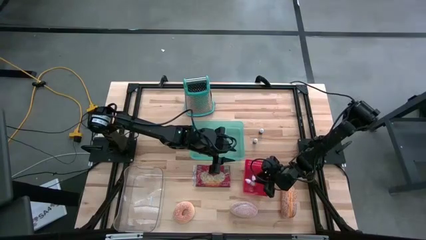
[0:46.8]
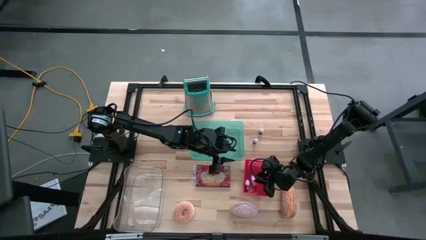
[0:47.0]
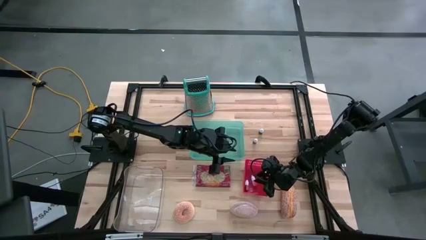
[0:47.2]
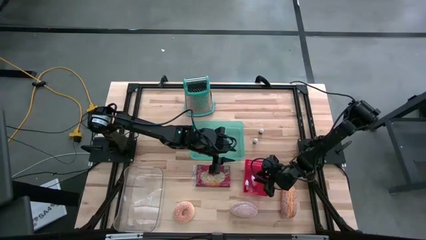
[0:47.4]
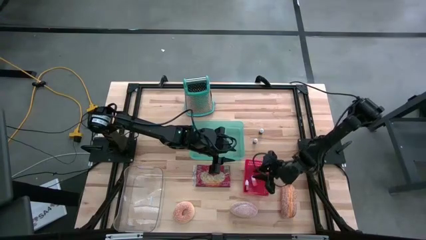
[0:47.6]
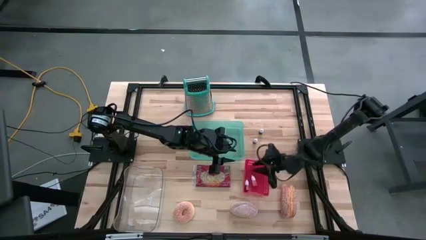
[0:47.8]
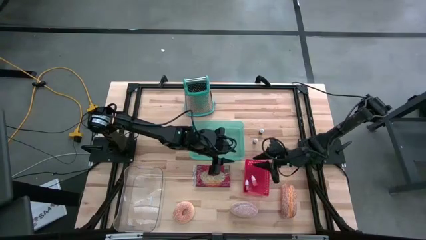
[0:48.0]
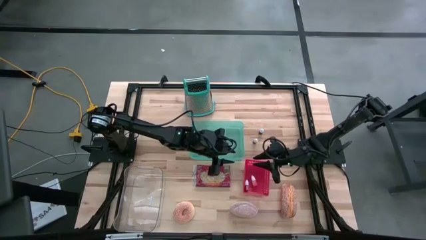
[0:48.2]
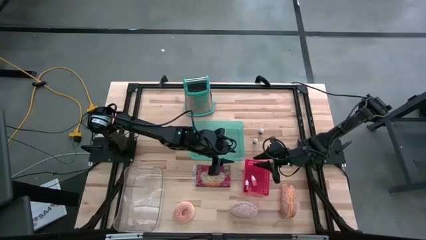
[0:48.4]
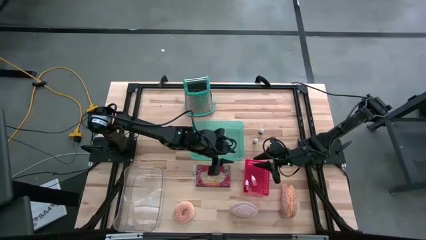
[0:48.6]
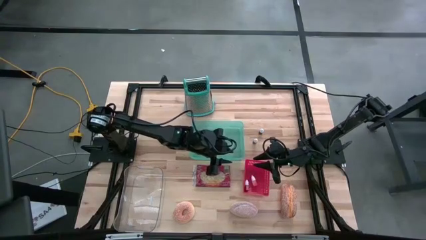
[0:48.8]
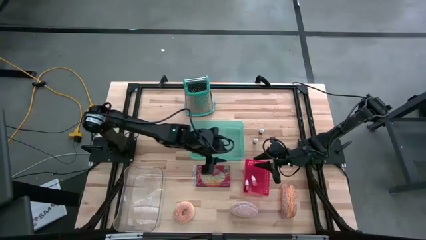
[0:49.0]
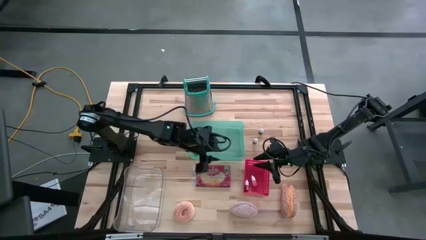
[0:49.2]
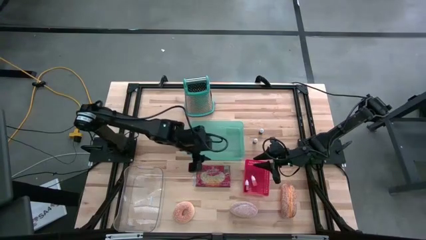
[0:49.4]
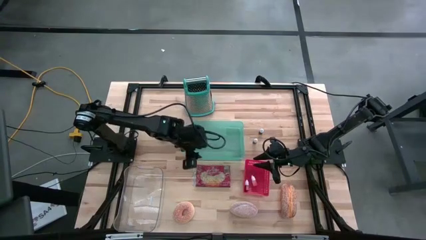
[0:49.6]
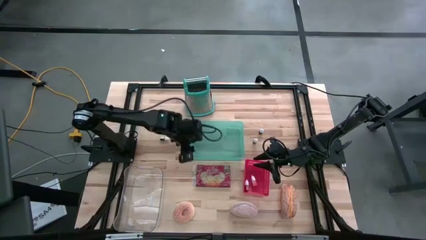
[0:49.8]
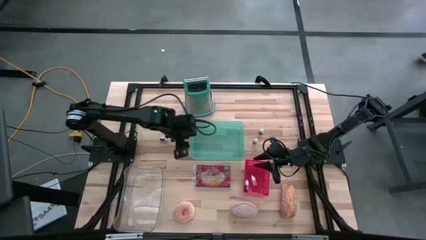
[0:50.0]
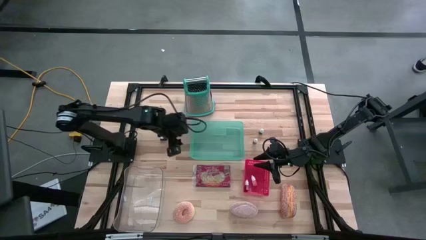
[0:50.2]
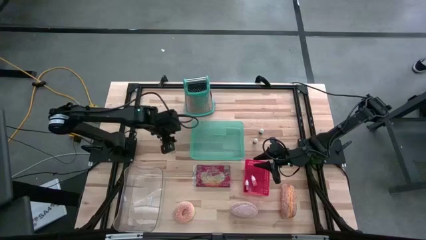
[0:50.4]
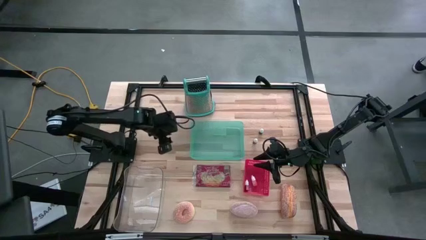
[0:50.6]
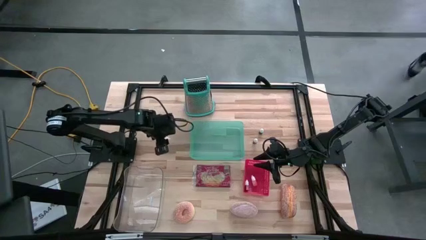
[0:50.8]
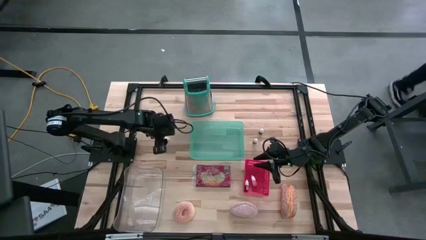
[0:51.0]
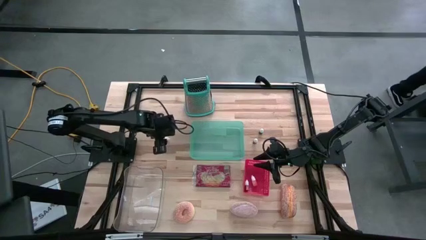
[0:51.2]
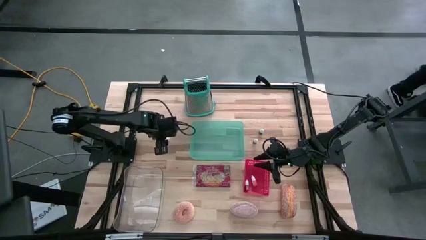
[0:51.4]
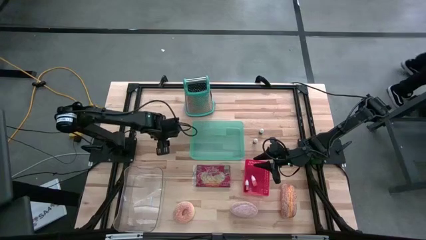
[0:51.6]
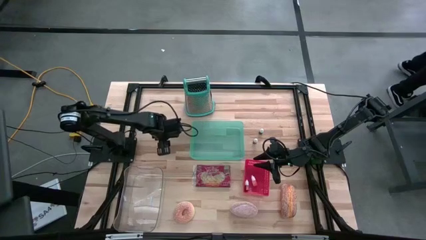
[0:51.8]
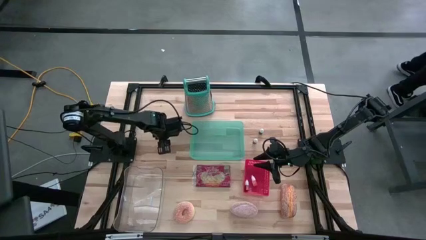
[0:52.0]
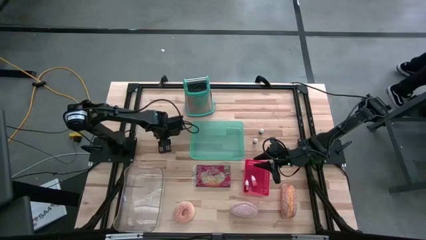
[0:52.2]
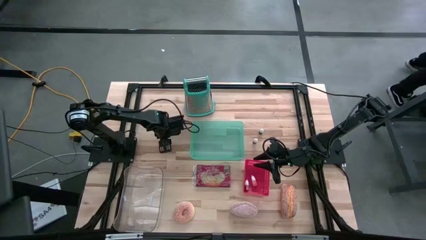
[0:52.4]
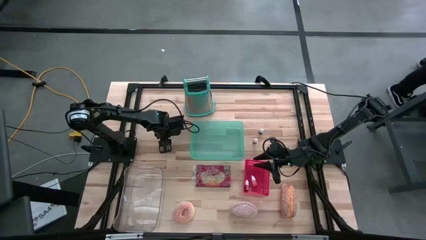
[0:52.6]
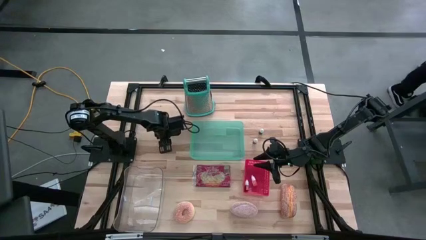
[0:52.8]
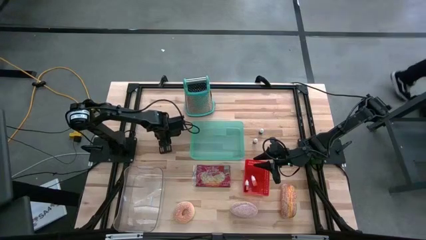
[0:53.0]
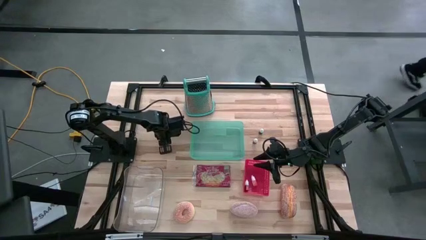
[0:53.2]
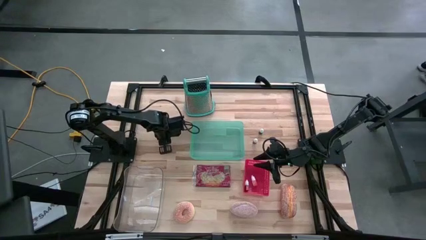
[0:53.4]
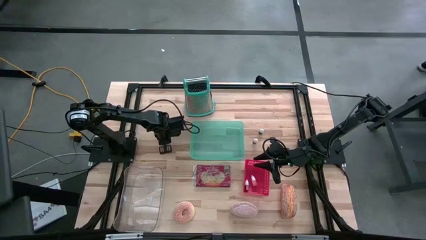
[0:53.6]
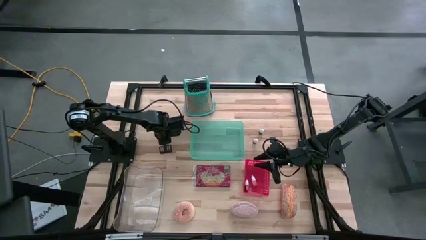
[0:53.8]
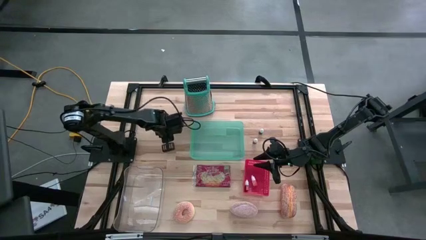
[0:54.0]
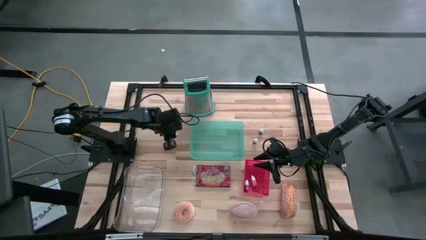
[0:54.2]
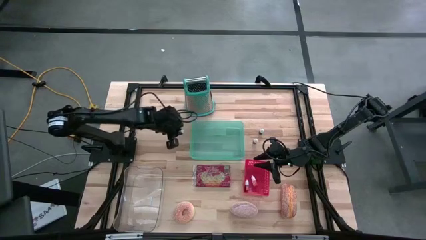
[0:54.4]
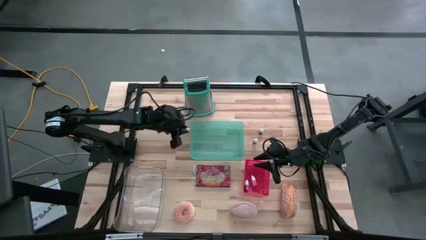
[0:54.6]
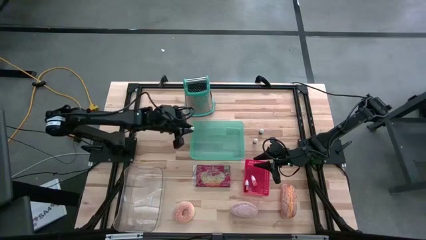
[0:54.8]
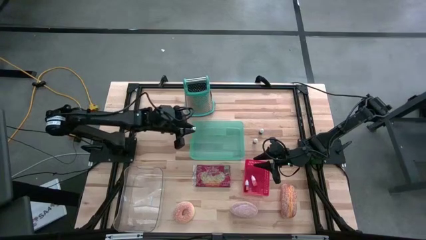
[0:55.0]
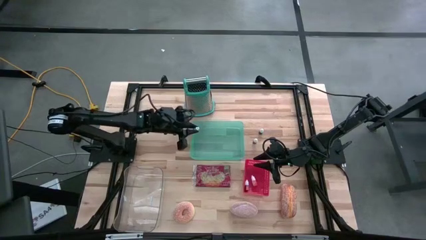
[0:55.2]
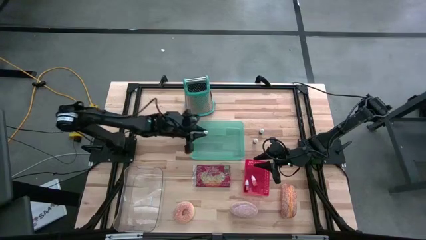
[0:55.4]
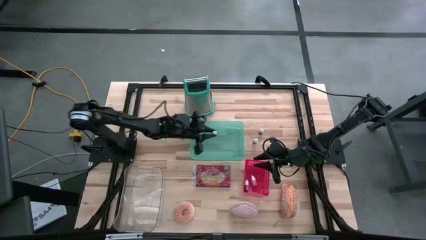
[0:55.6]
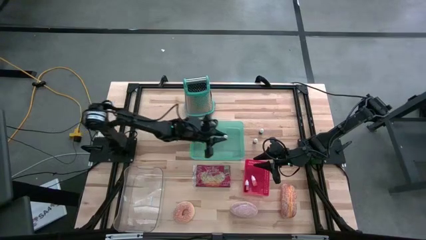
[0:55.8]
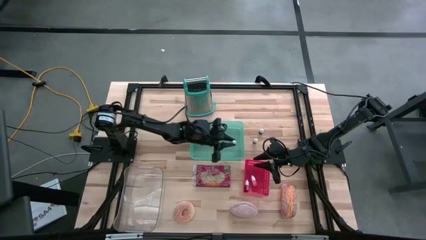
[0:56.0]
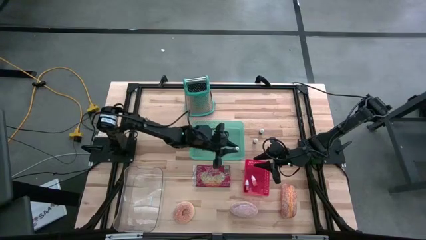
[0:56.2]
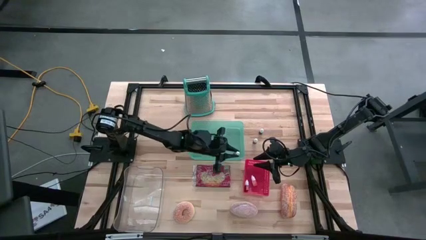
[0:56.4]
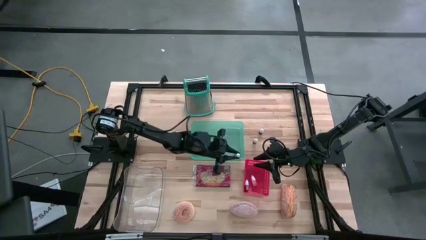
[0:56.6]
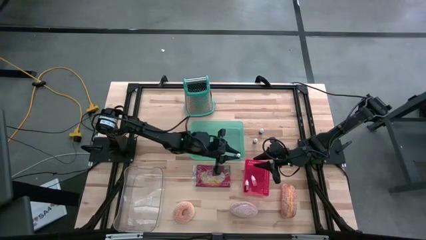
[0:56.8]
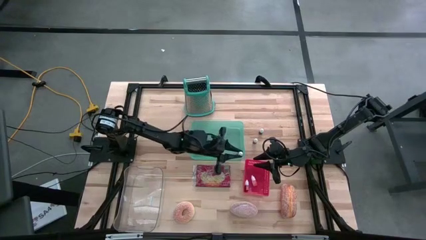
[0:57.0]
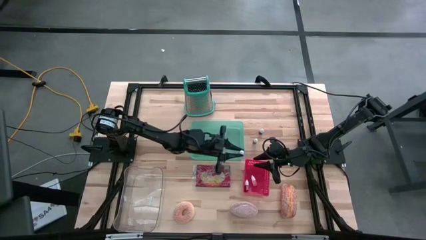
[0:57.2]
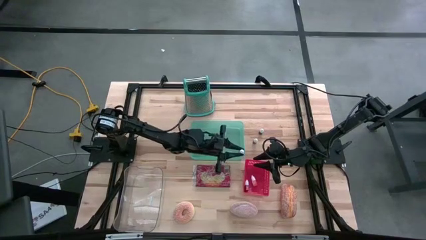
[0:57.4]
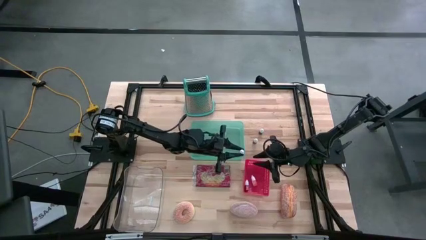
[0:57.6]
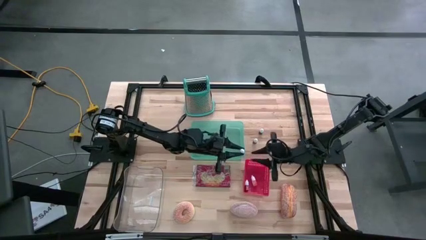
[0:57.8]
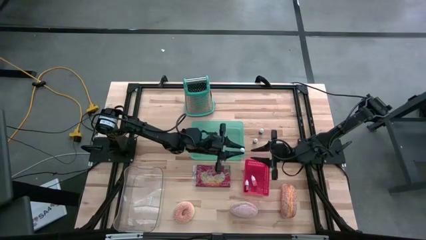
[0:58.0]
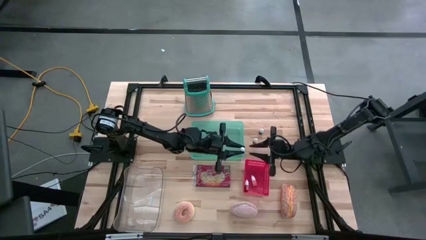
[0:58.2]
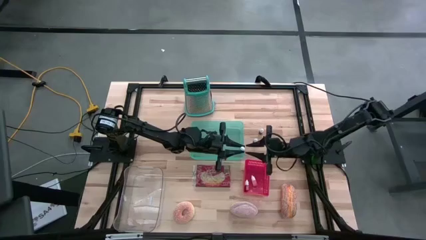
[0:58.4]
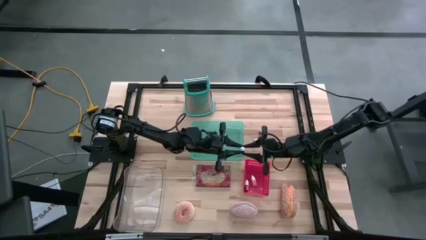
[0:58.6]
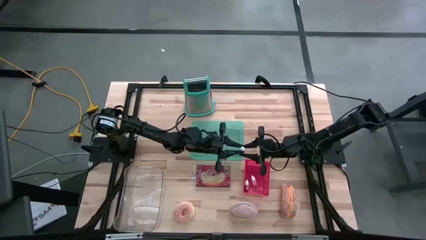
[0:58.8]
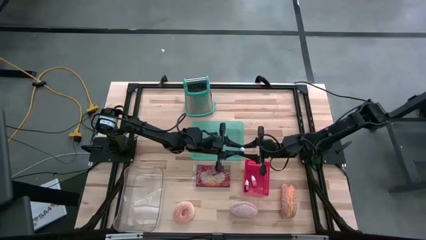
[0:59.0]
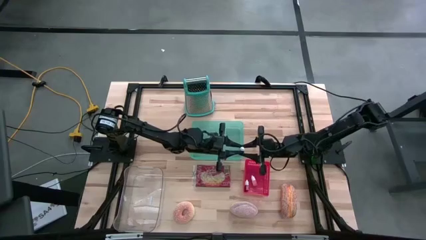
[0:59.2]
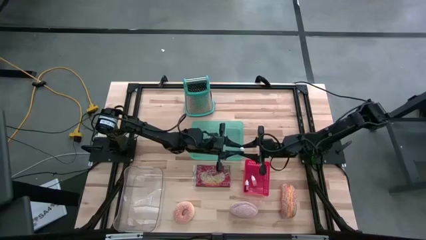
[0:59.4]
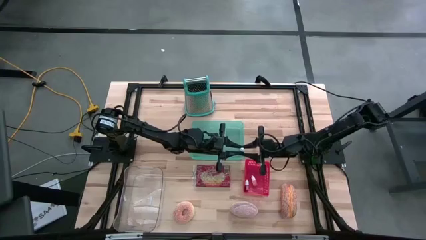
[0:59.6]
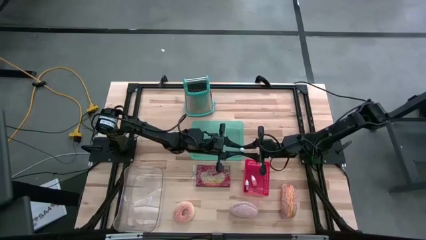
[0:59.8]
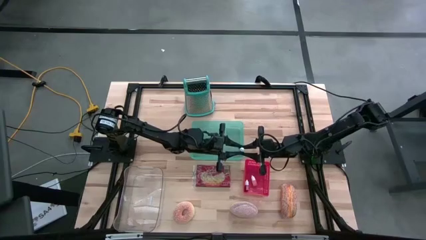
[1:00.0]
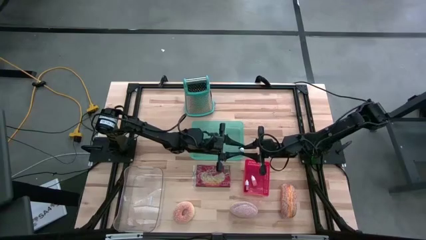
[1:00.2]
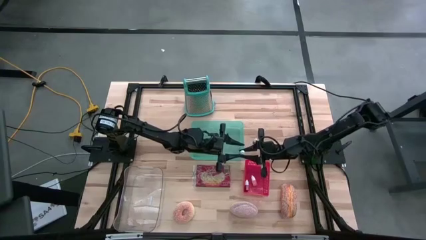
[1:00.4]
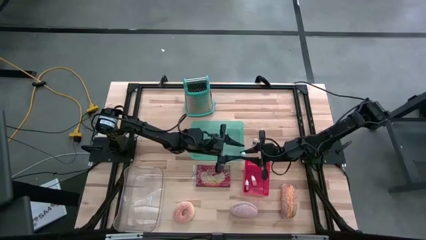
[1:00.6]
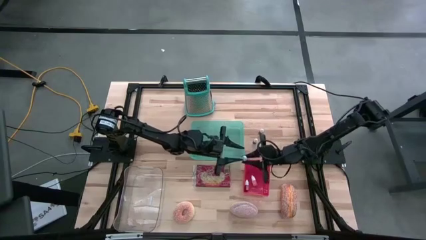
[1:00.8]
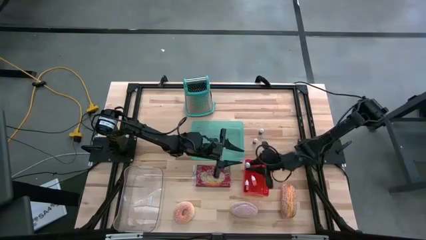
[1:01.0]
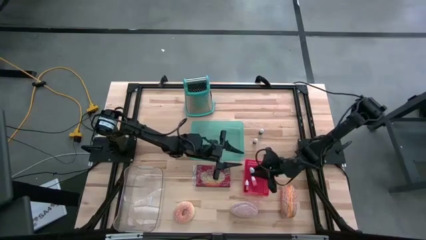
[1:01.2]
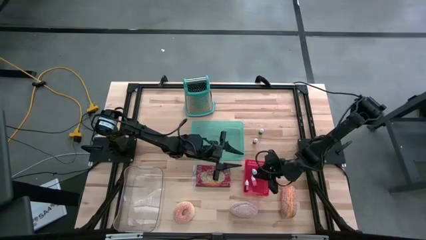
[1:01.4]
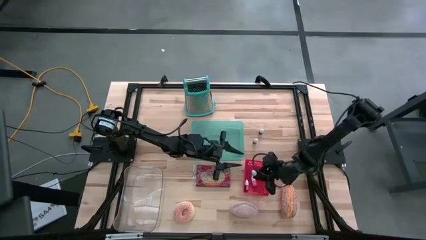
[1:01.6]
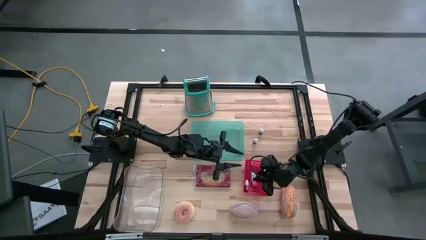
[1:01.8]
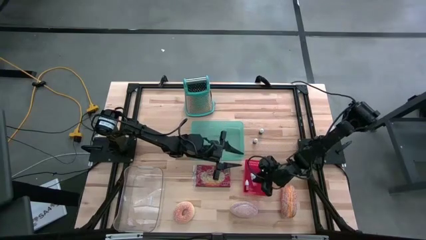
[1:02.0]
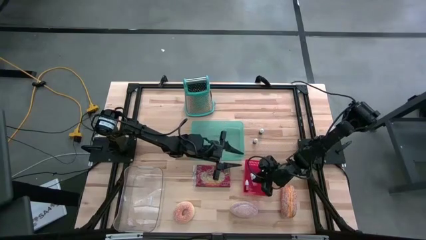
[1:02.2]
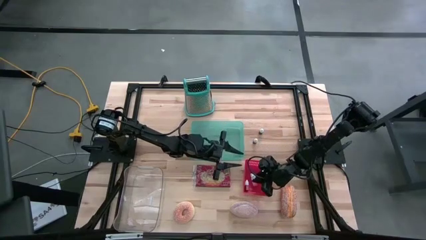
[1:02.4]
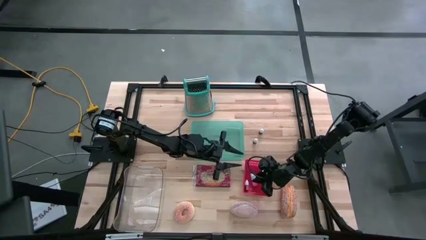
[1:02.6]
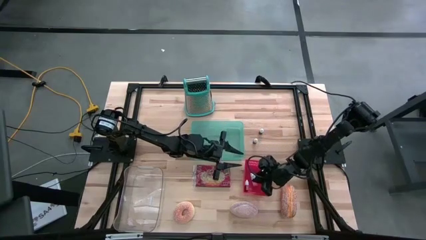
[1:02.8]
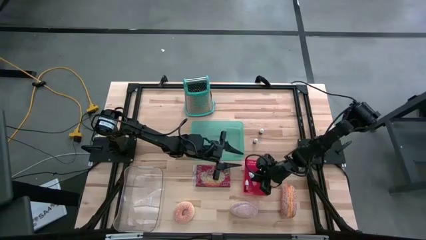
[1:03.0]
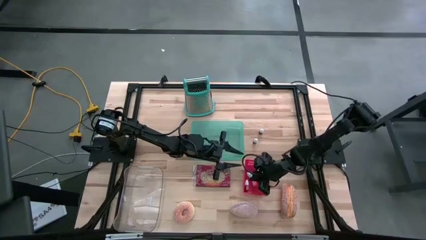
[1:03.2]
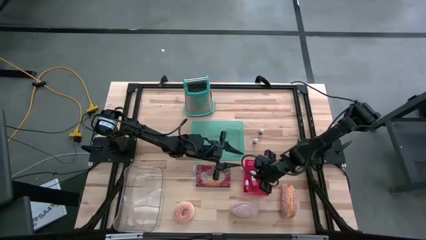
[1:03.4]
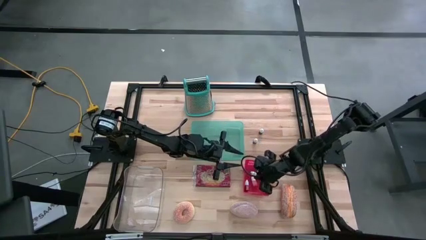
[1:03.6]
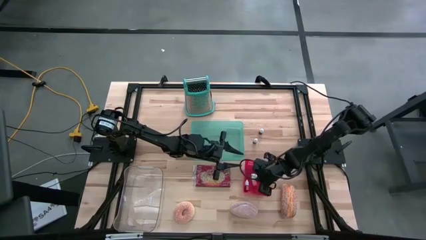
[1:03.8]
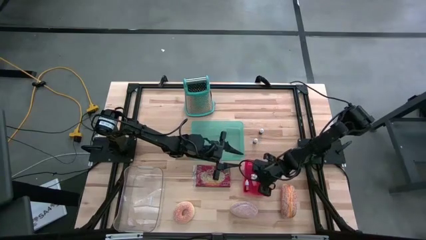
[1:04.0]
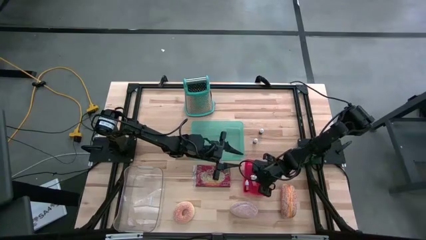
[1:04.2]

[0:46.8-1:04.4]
Task: Pick & Place Food Item
Put the left red food coloring bottle into the red bin
